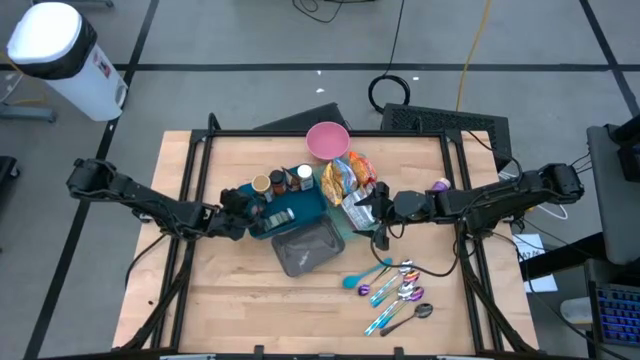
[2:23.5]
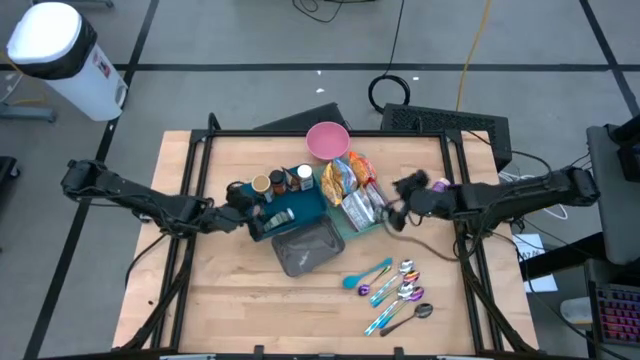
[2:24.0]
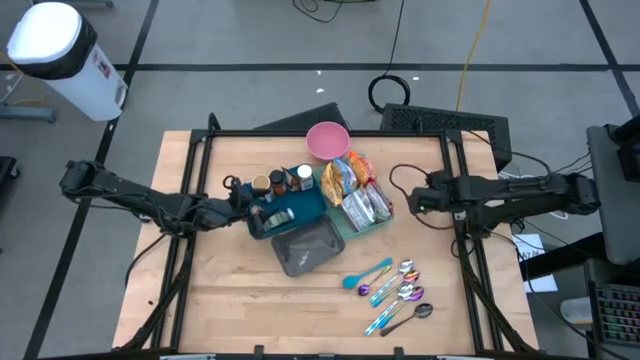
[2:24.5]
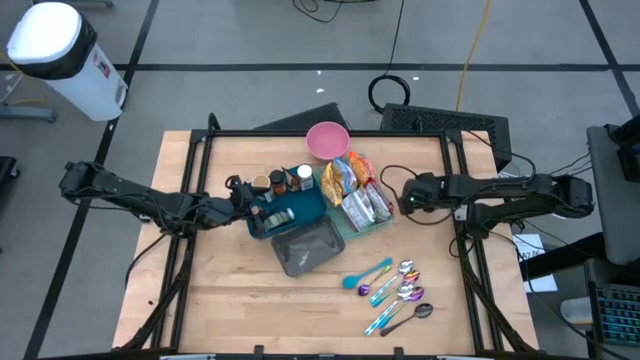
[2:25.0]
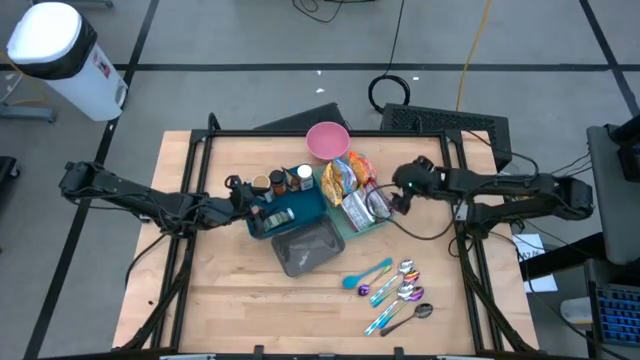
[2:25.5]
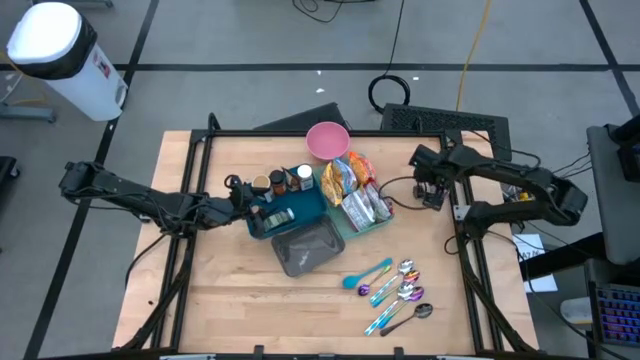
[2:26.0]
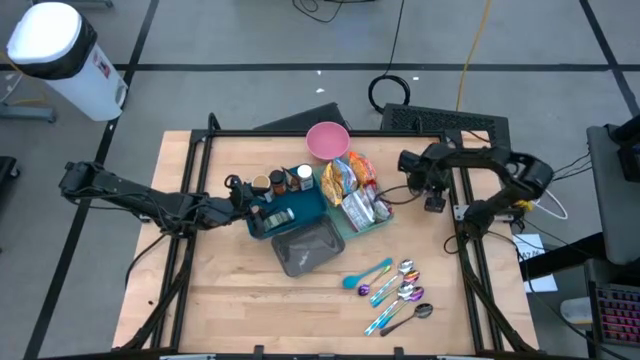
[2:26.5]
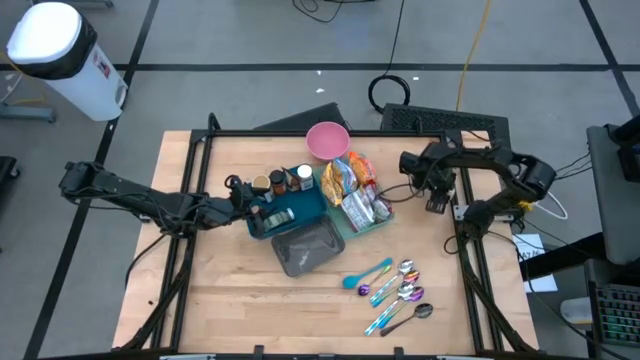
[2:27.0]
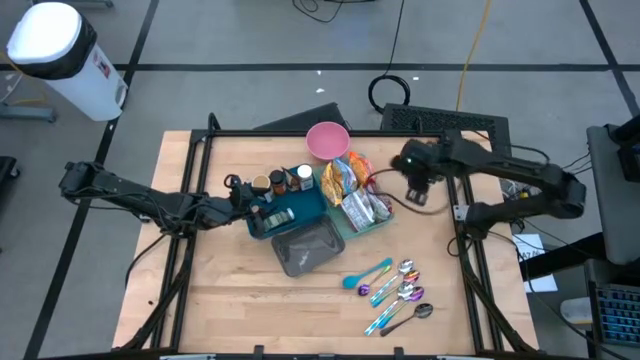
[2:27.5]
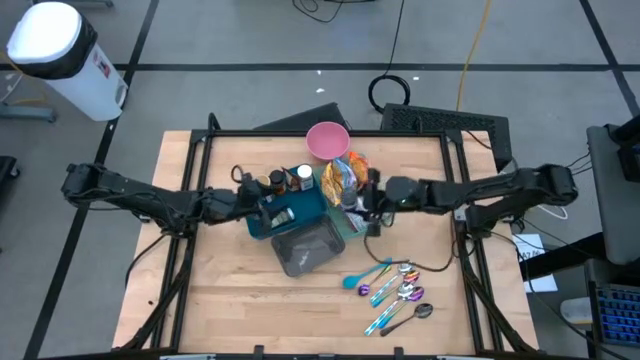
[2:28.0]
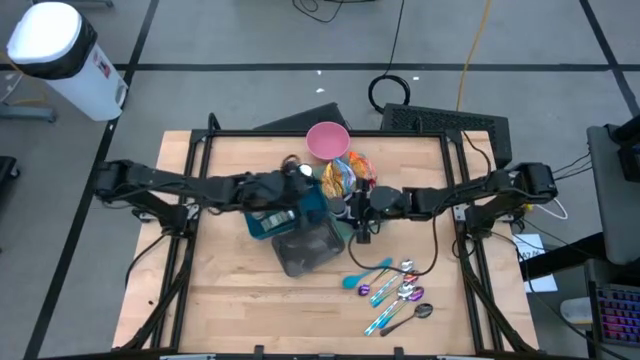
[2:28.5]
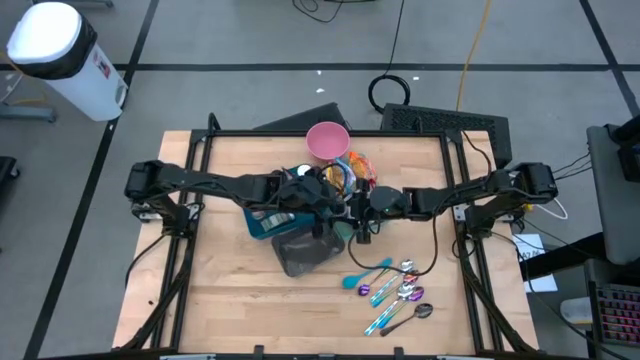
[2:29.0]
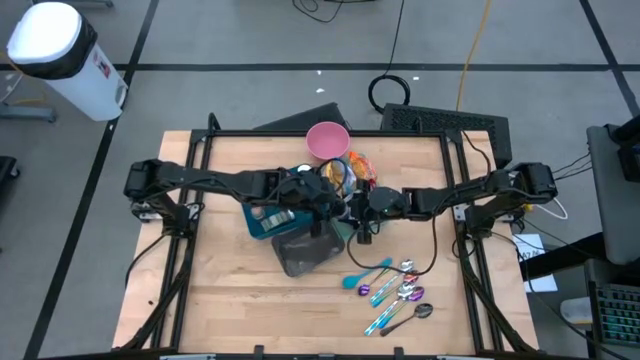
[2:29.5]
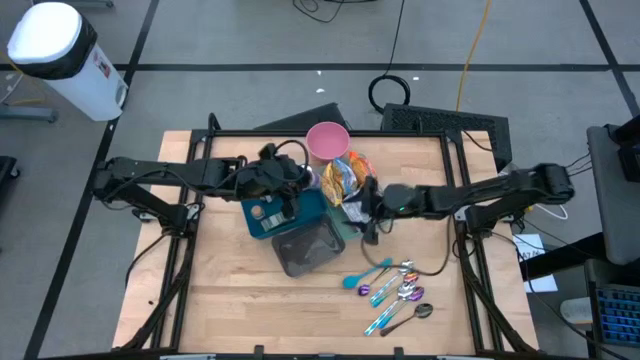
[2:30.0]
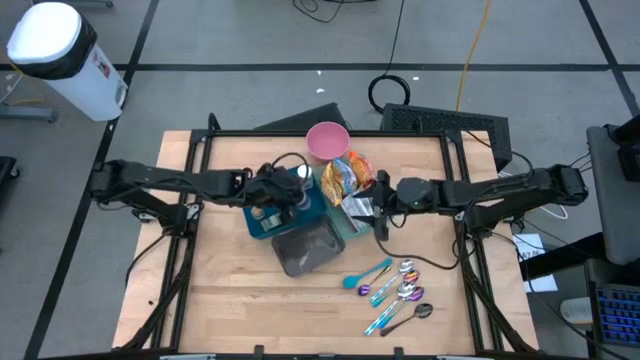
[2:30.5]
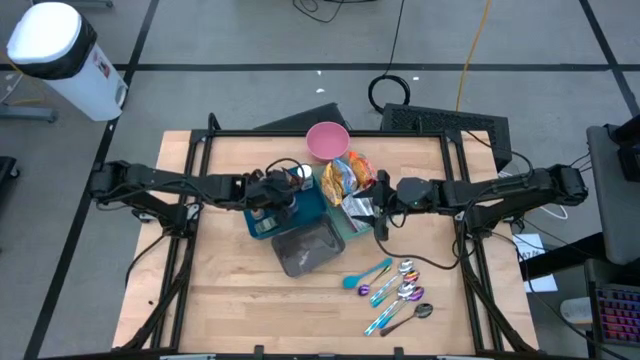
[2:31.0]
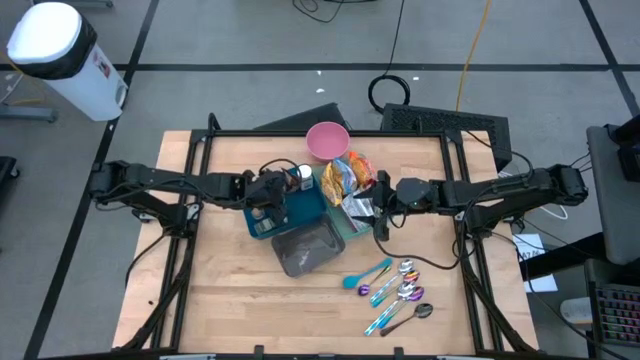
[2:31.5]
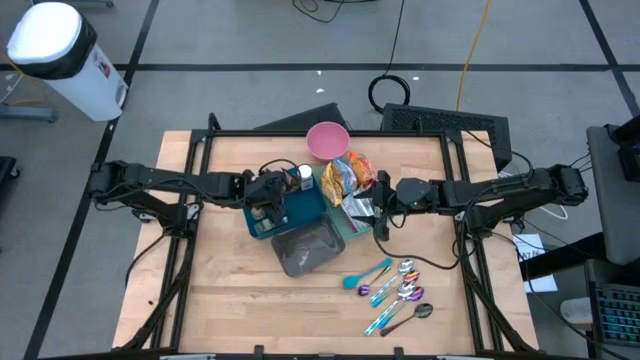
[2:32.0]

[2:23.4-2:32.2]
Task: Pick & Place Food Item
Put the purple seasoning bottle into the blue bin

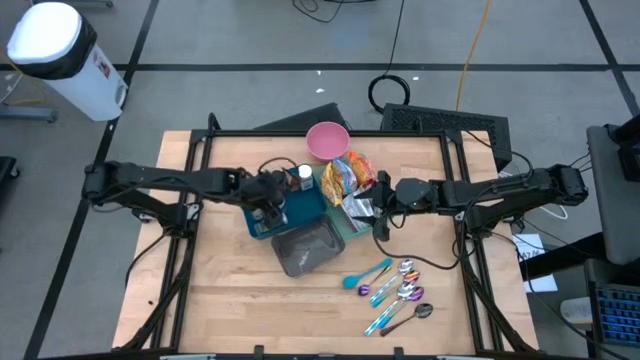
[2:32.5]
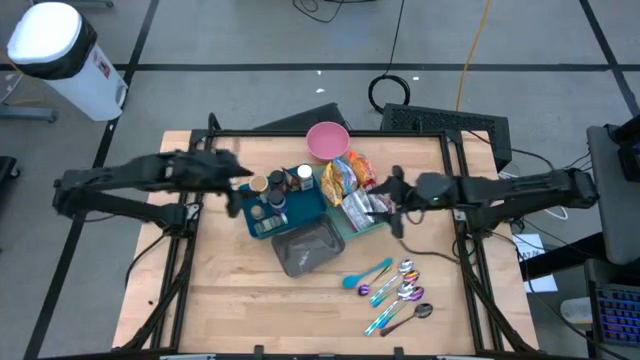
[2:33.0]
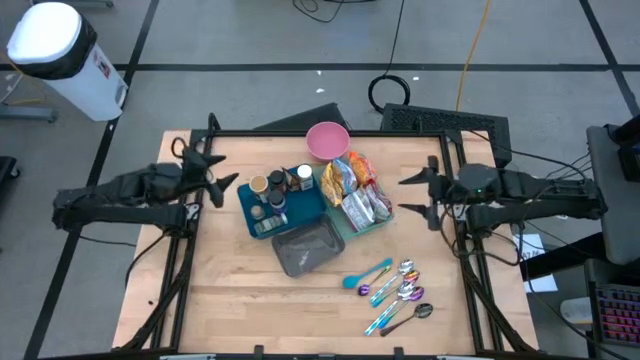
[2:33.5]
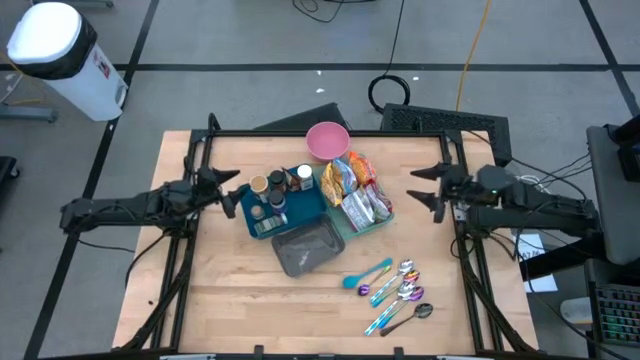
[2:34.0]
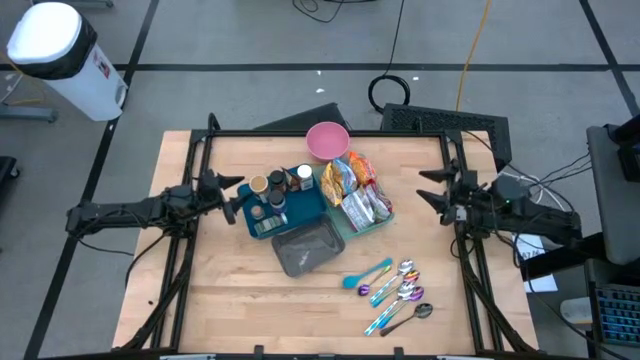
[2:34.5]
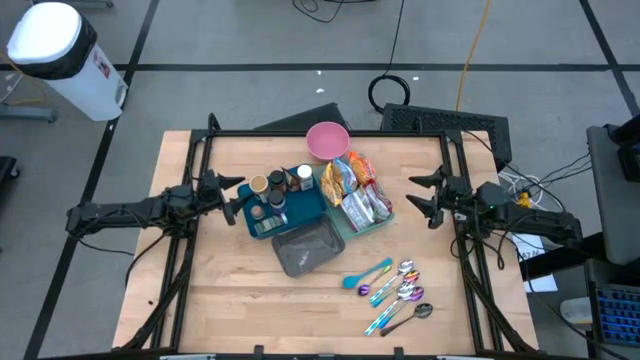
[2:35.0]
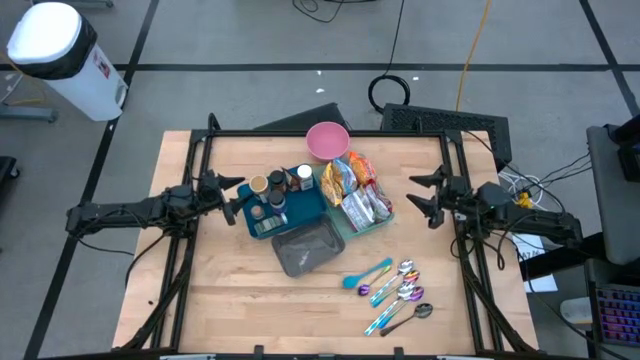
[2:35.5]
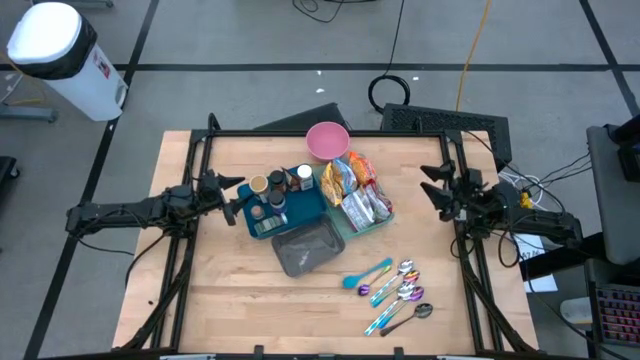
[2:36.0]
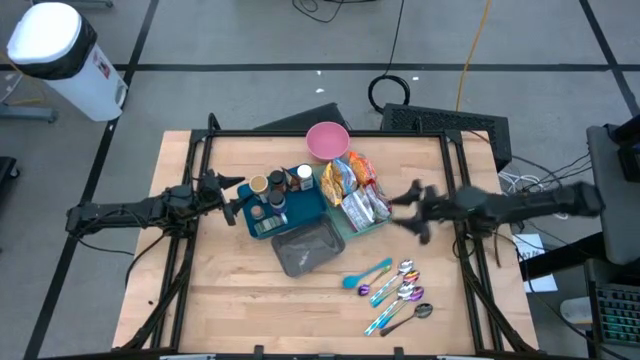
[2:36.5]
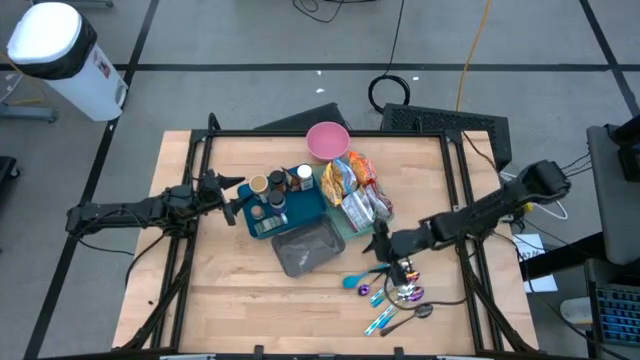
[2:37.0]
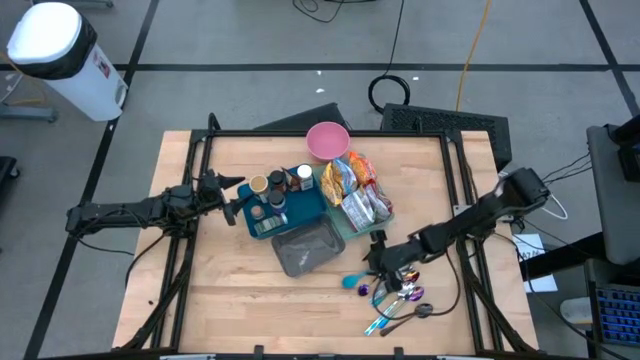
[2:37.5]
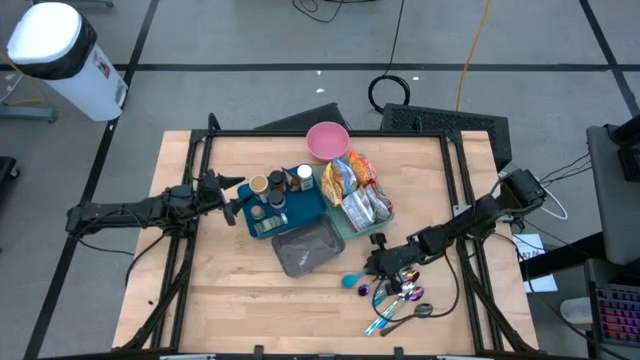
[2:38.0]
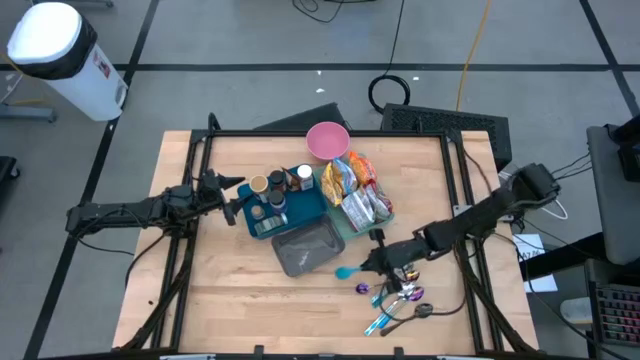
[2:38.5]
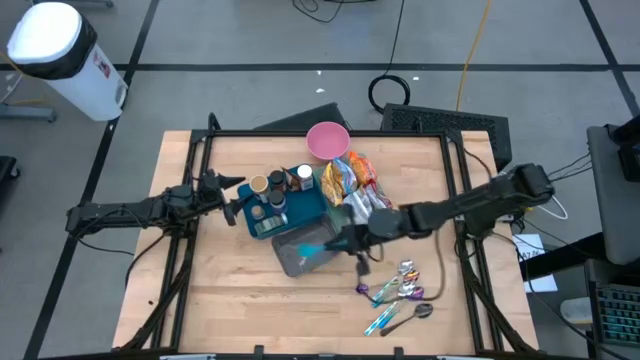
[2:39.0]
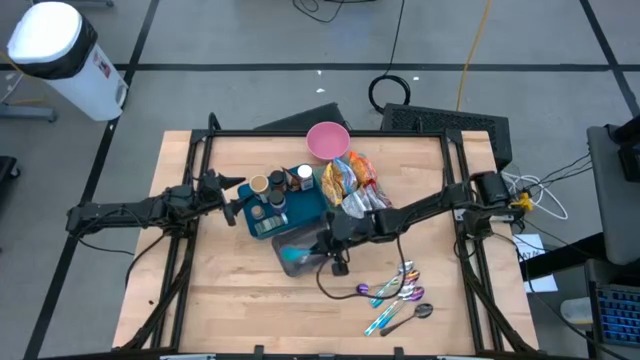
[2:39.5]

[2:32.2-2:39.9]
Put the light blue spoon into the black bin

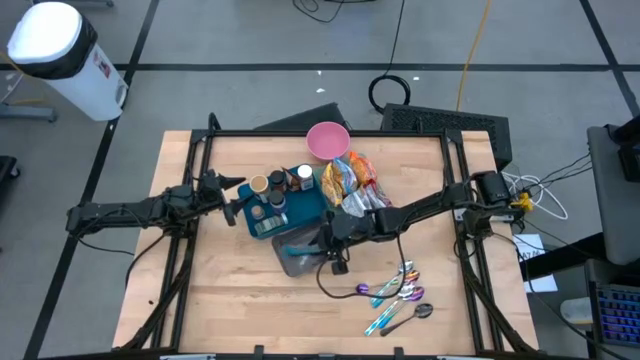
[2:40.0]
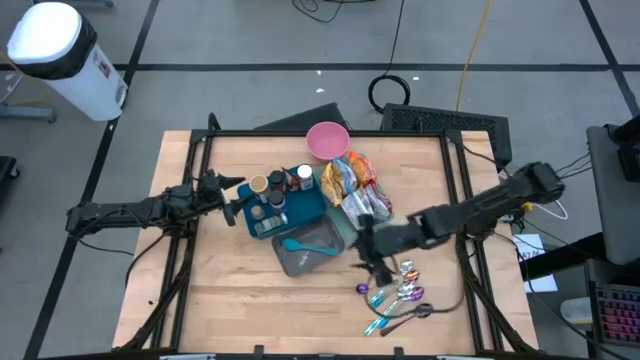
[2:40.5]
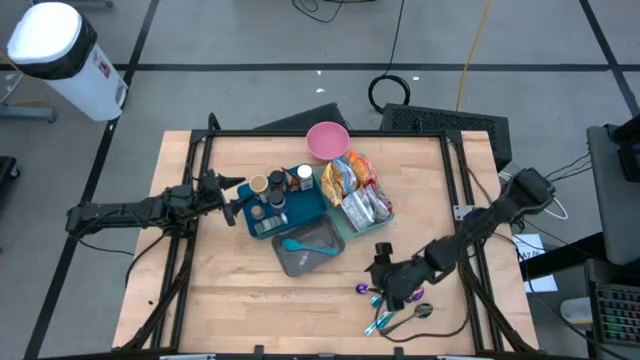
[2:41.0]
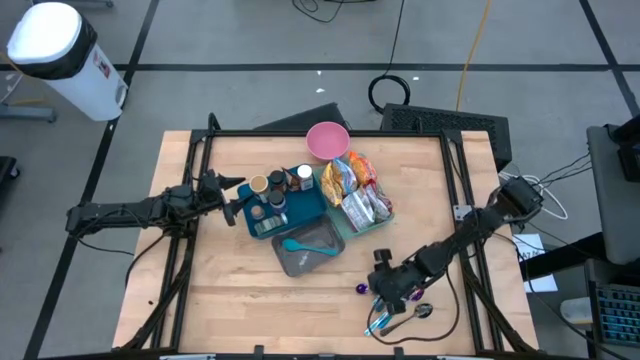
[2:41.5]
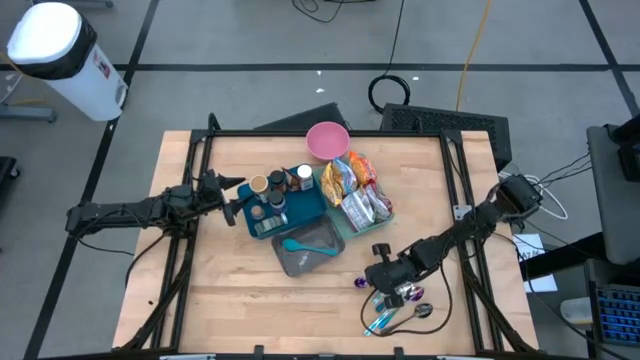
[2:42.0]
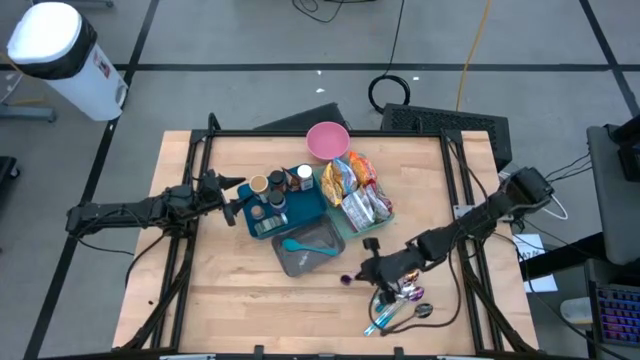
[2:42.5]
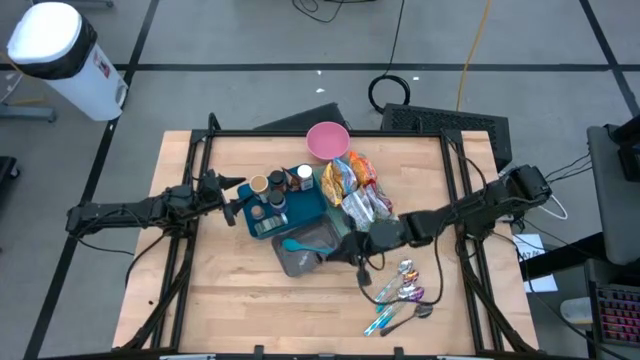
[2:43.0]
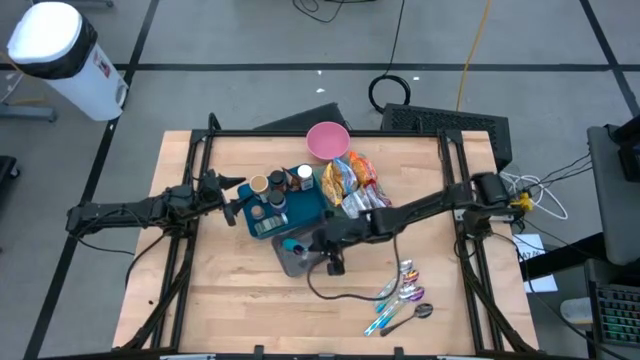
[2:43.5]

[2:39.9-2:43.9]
Put the top blue spoon into the black bin

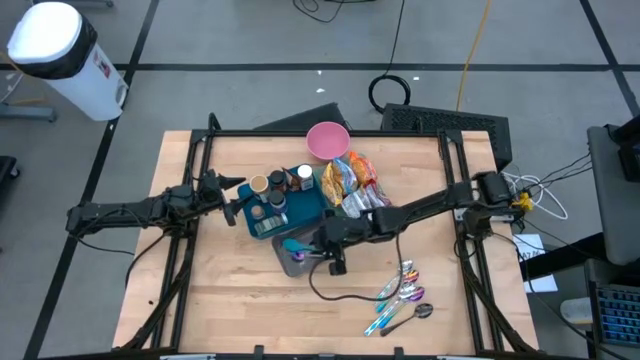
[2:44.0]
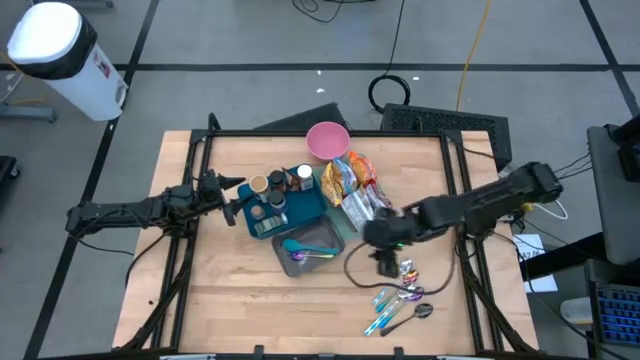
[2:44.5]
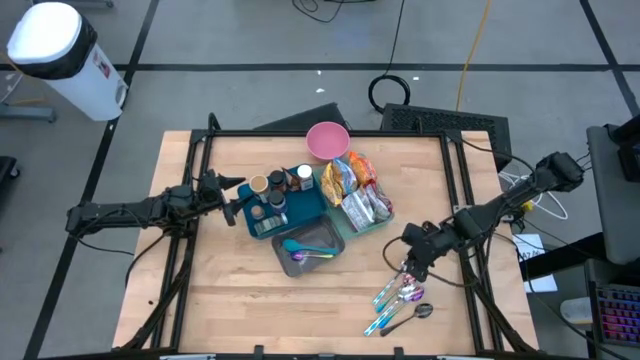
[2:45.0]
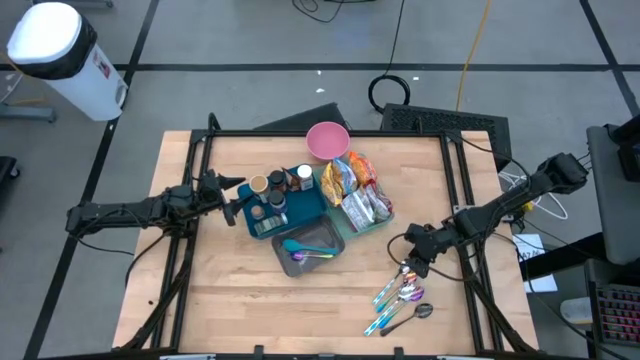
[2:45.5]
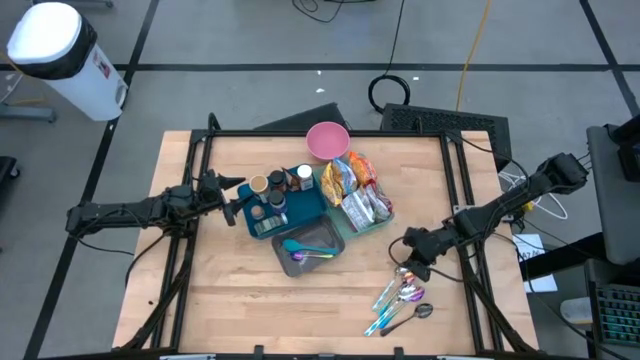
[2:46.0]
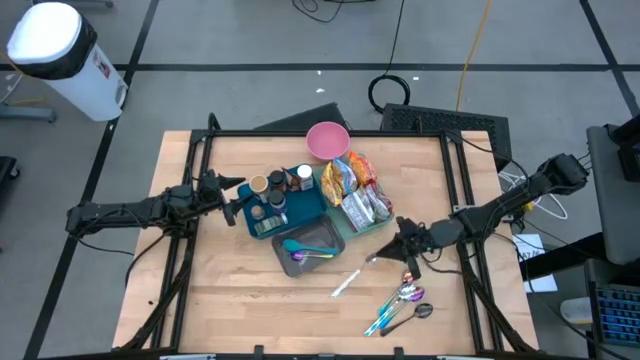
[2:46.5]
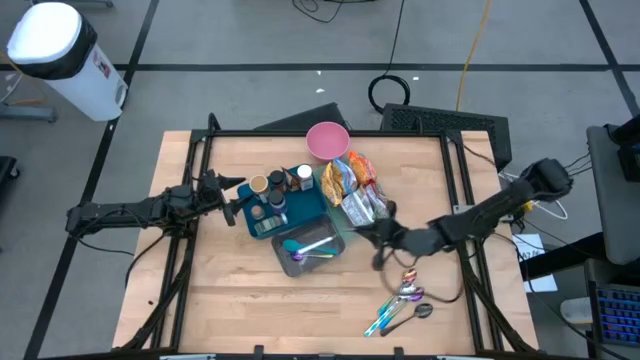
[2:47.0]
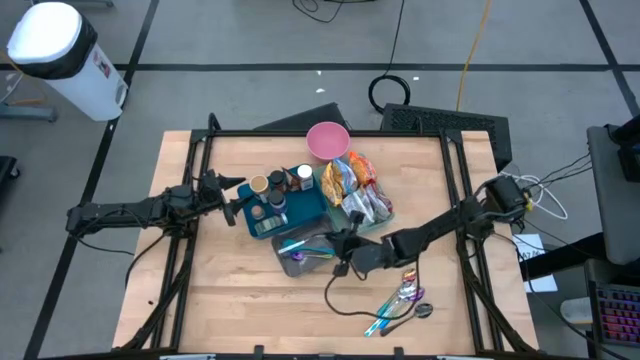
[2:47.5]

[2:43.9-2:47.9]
Put the top white spoon into the black bin
